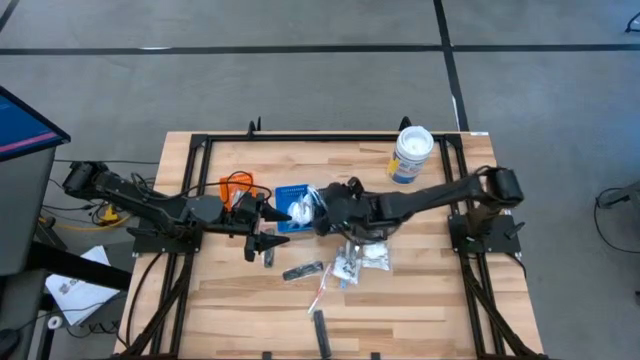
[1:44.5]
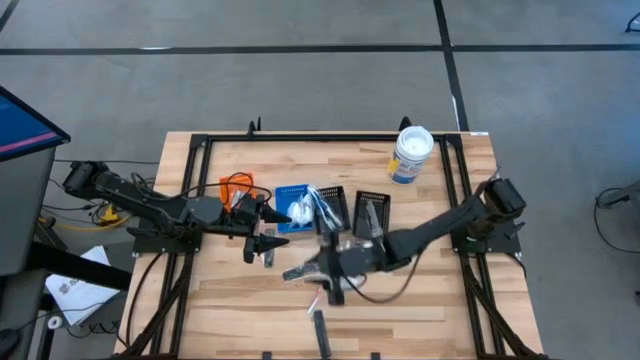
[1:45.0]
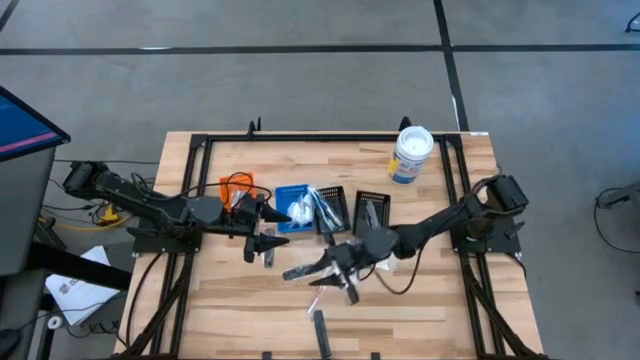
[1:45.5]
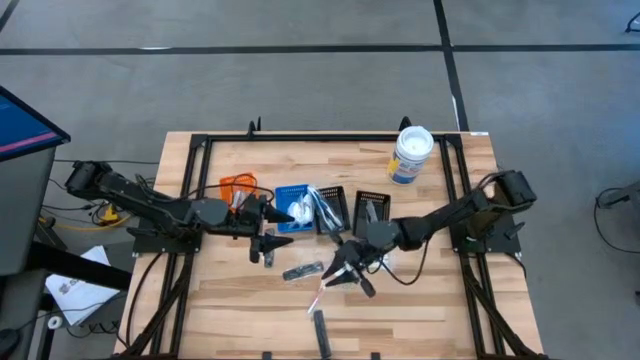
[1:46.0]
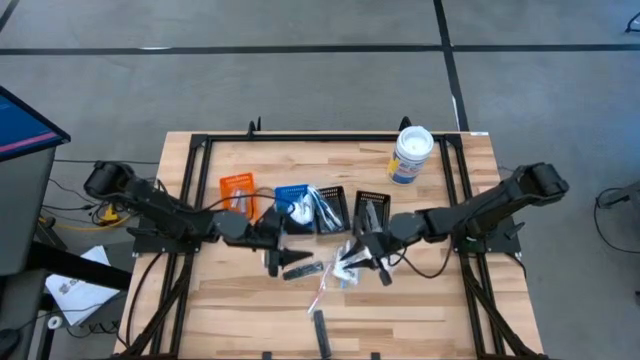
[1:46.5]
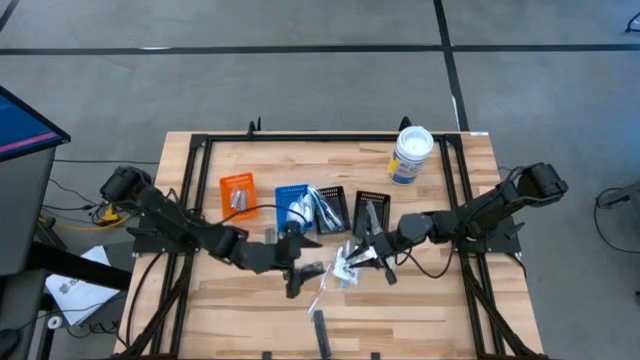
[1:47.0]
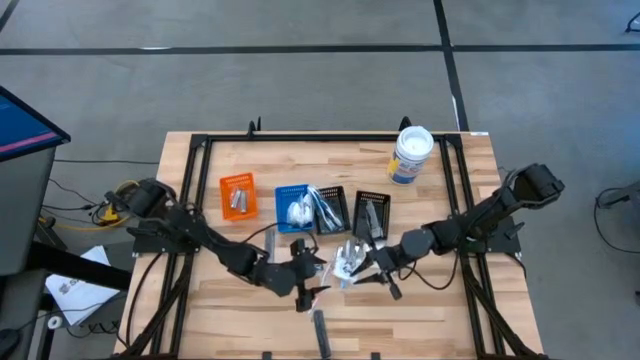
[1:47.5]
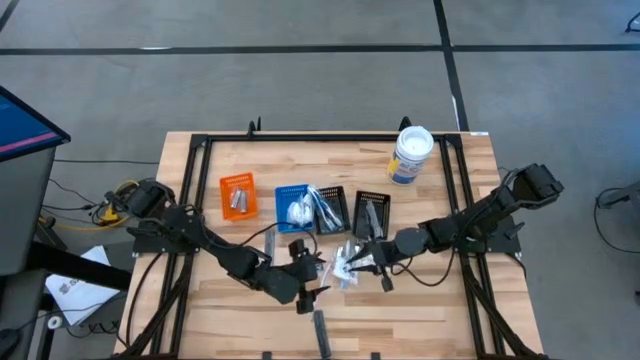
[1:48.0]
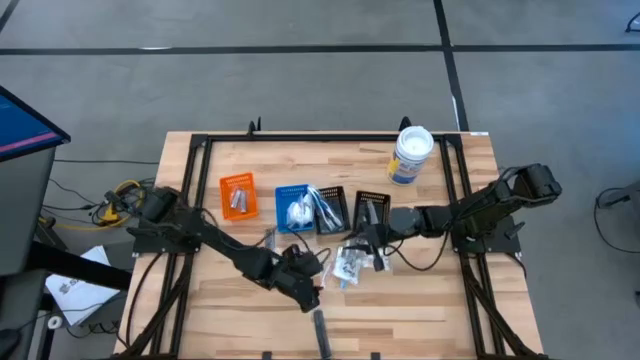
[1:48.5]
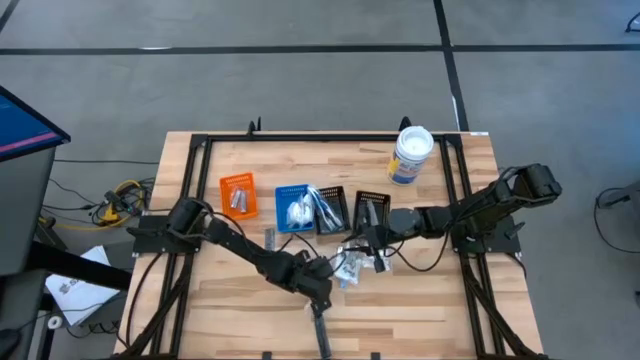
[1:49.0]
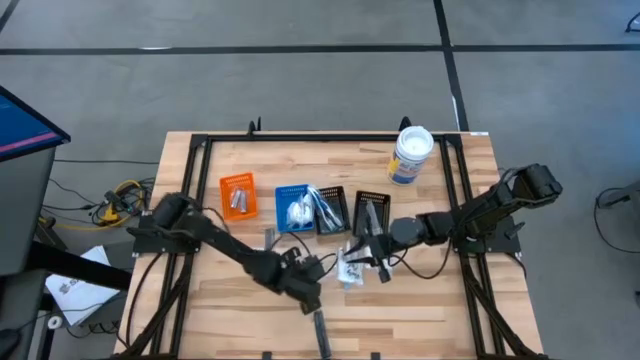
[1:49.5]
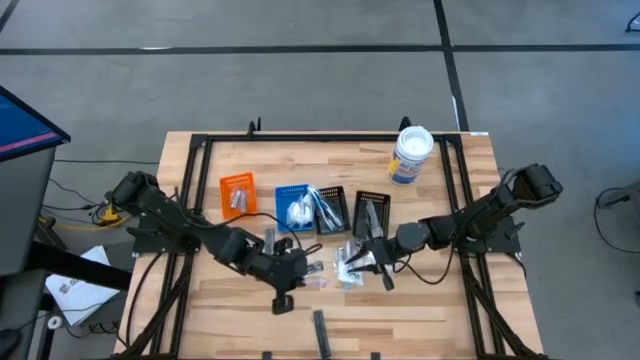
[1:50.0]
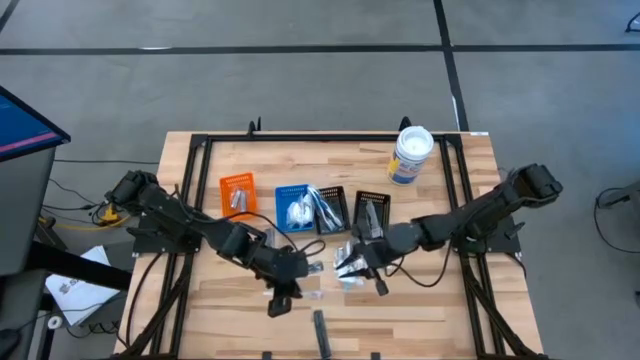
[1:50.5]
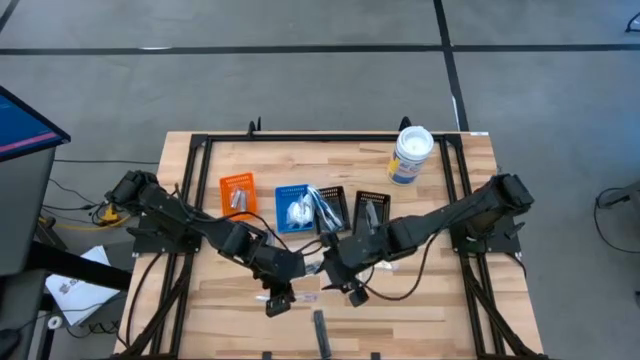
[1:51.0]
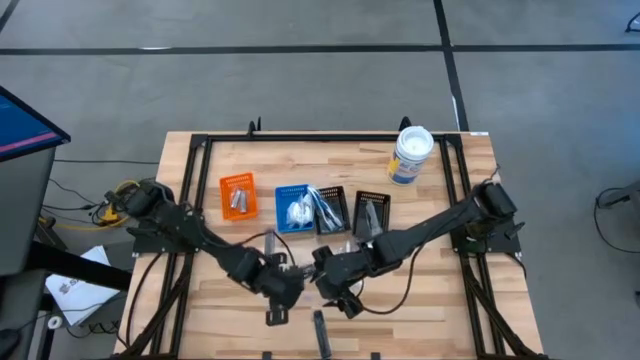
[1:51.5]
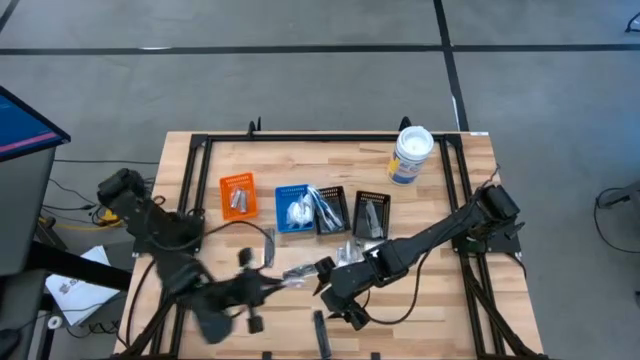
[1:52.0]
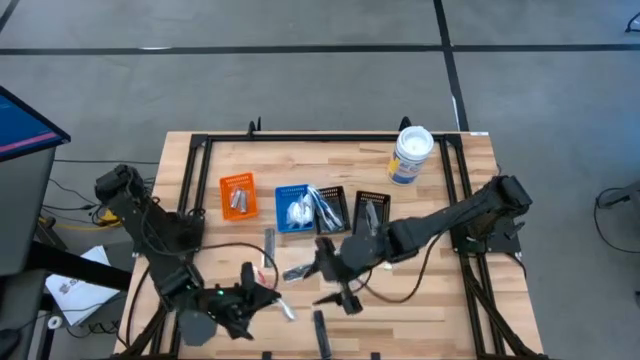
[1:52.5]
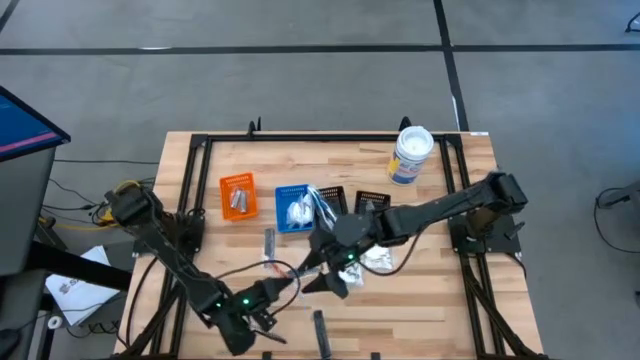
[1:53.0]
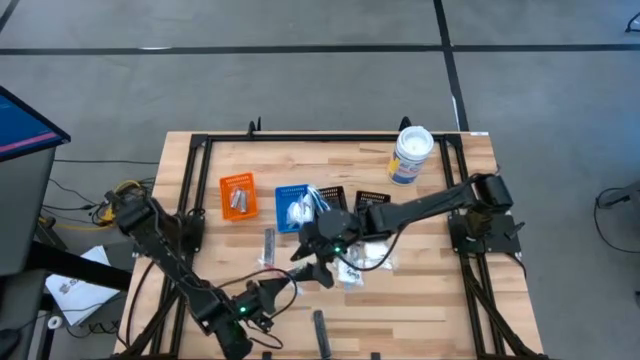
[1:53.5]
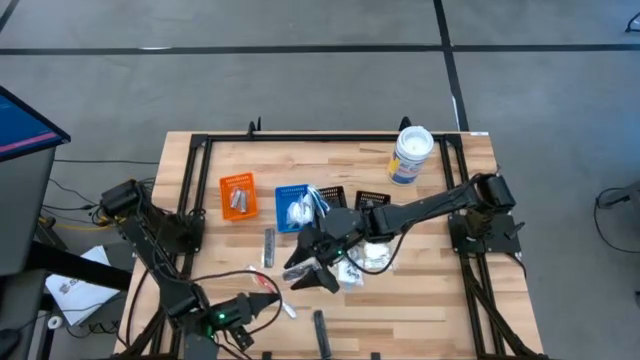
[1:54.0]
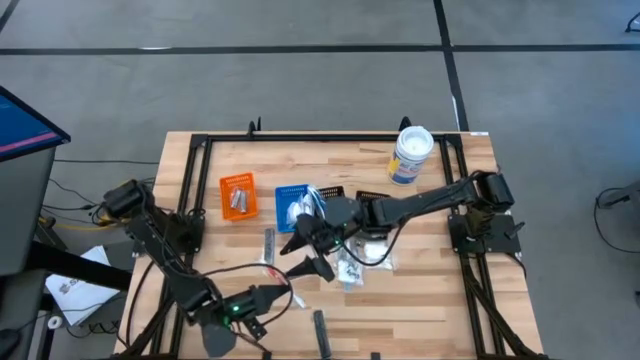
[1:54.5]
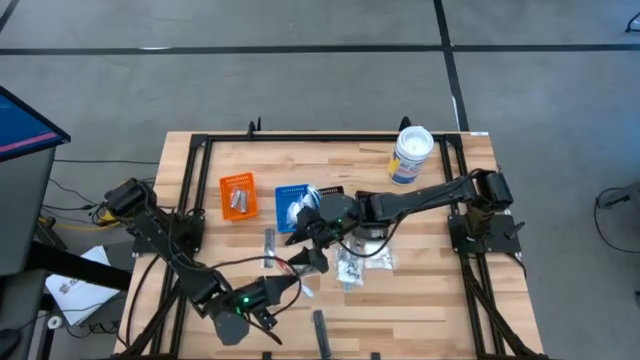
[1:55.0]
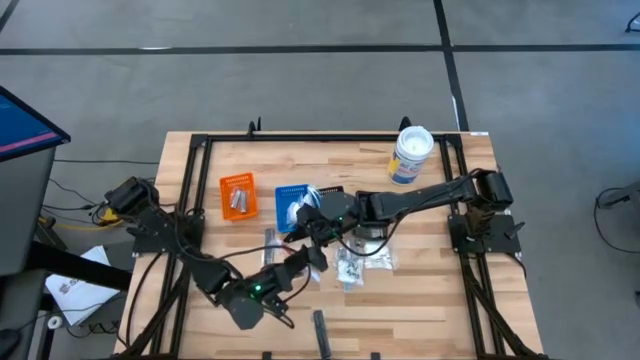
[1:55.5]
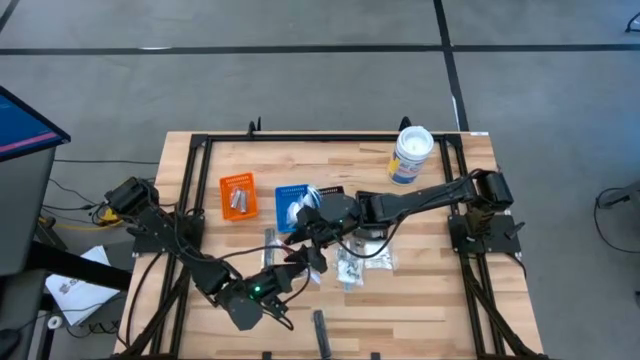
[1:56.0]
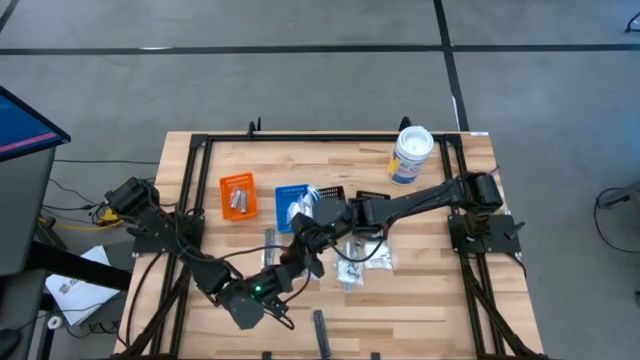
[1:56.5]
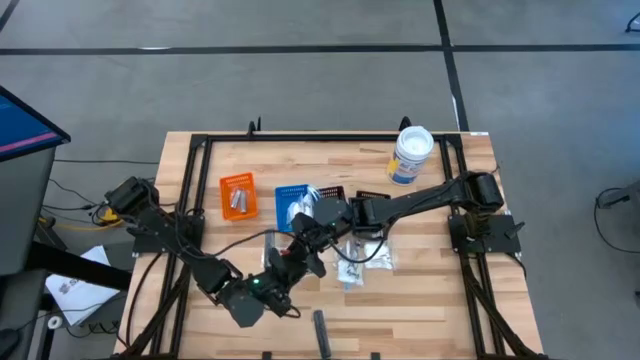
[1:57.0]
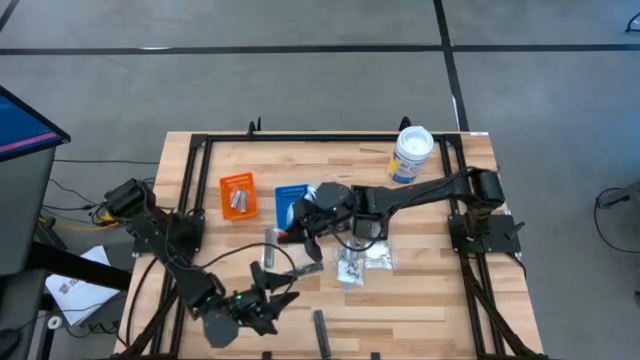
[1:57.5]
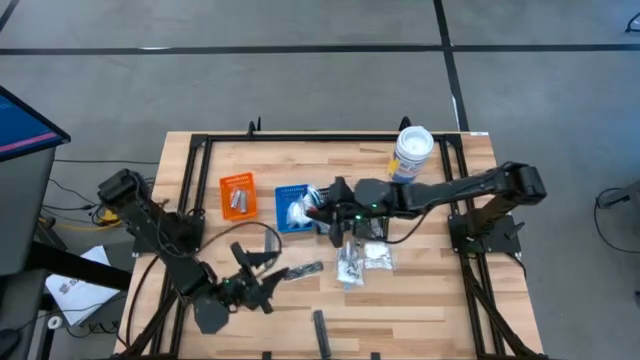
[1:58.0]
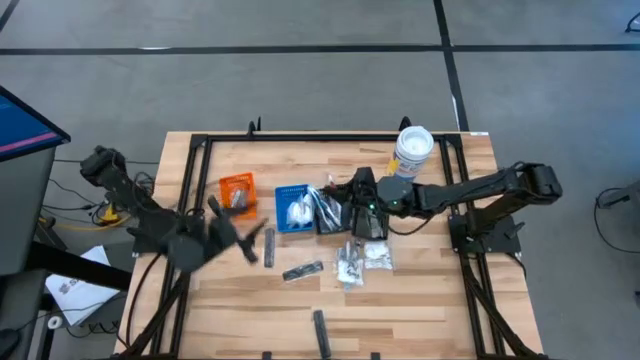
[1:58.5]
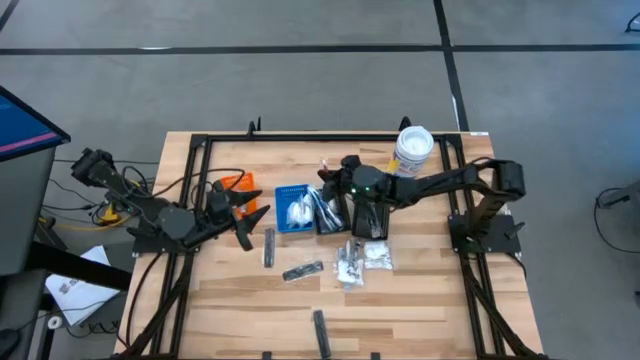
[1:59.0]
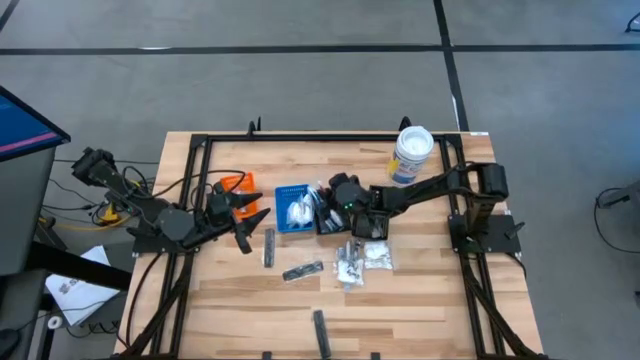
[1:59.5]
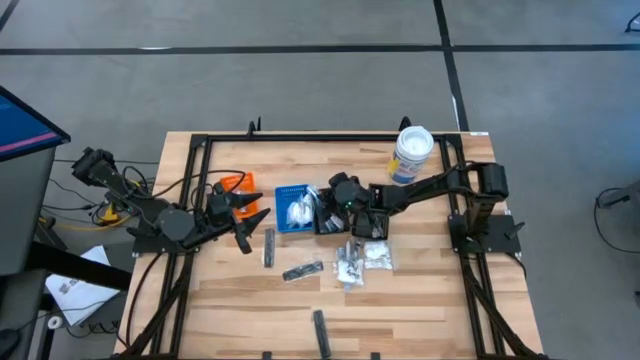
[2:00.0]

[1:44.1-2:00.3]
Task: Pick & Place Travel size toiletries
Put the orange toothbrush into the left black bin

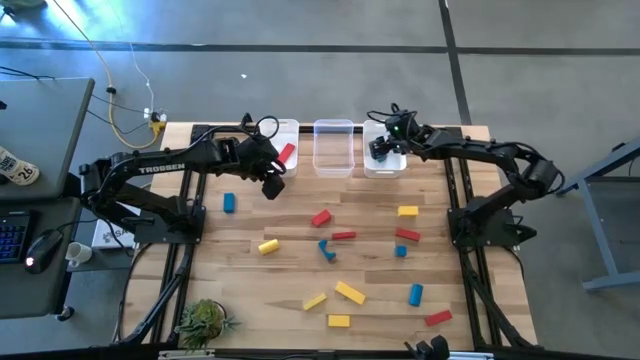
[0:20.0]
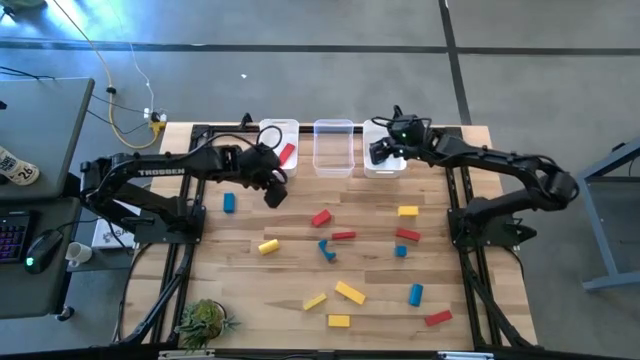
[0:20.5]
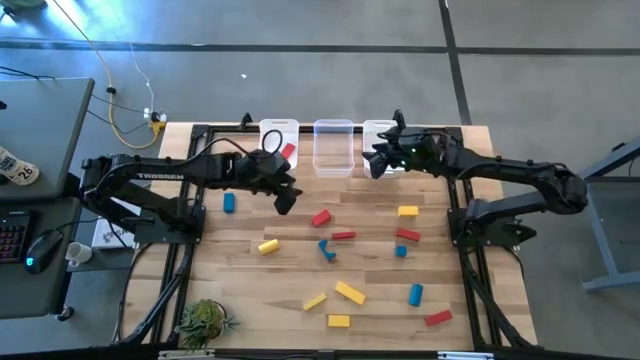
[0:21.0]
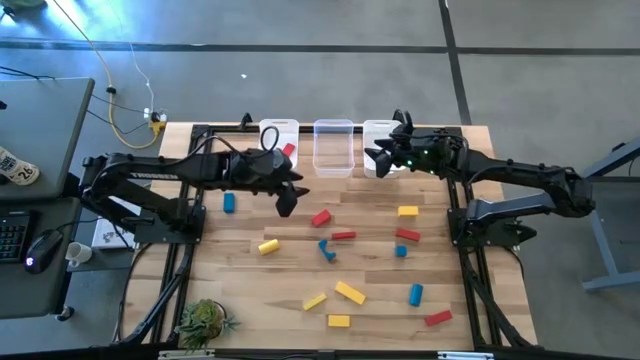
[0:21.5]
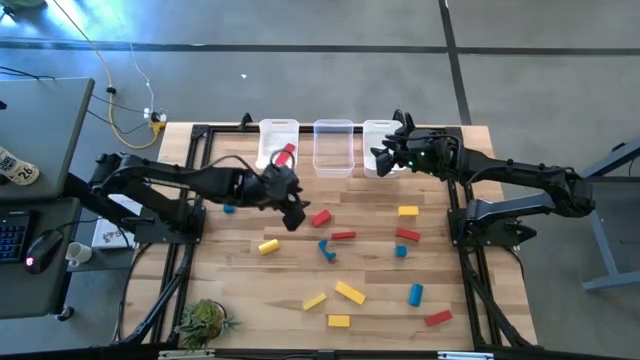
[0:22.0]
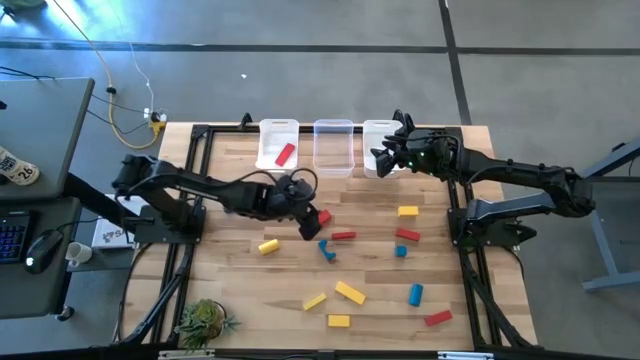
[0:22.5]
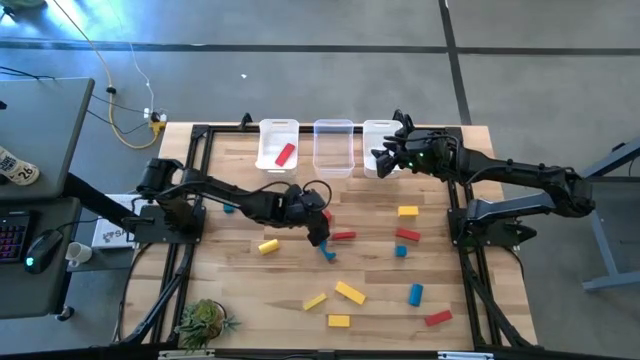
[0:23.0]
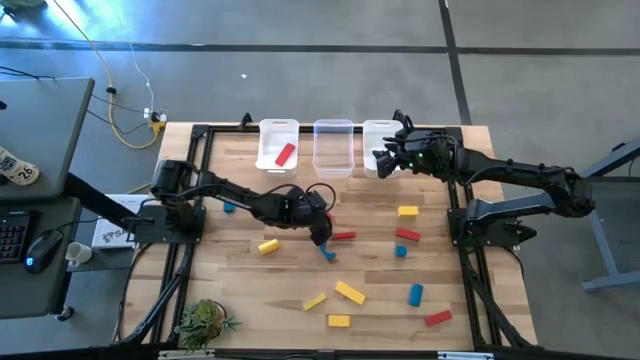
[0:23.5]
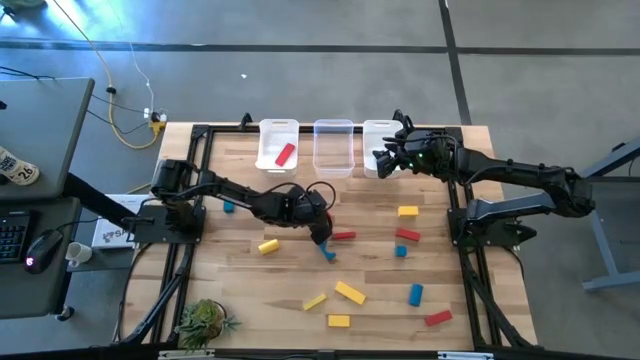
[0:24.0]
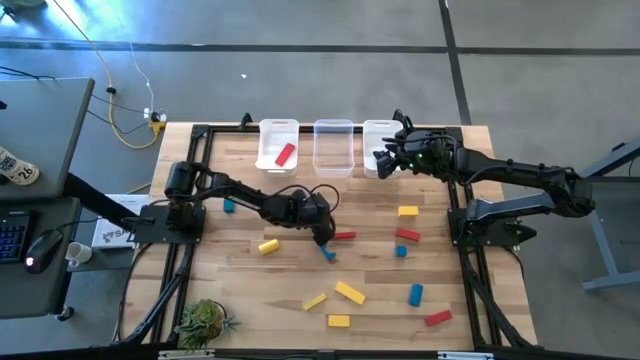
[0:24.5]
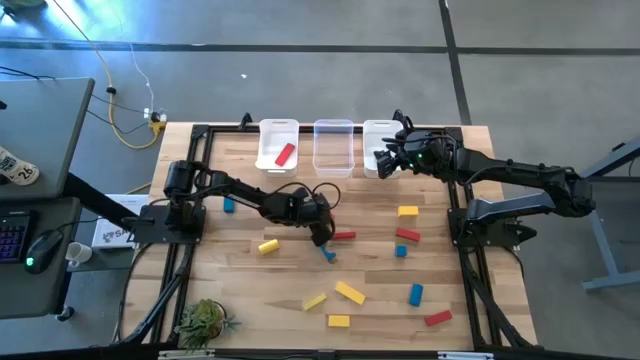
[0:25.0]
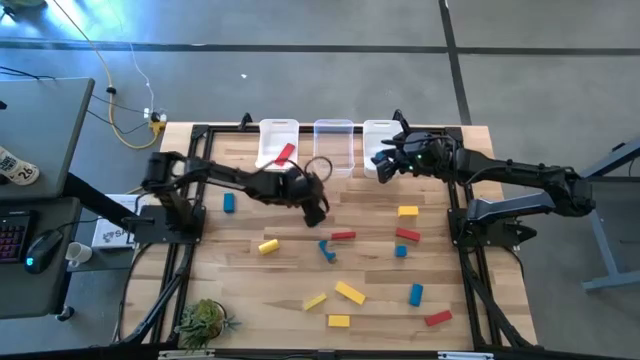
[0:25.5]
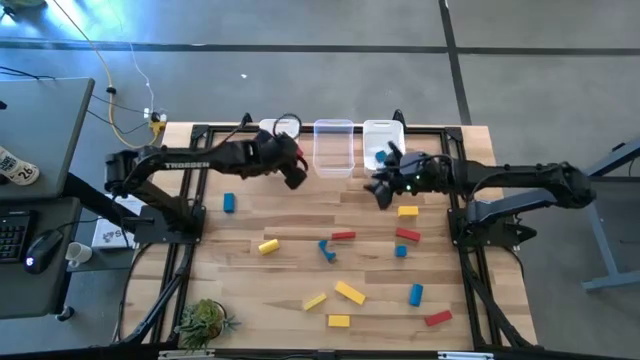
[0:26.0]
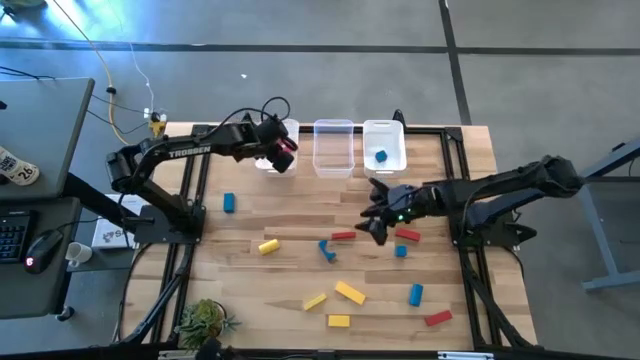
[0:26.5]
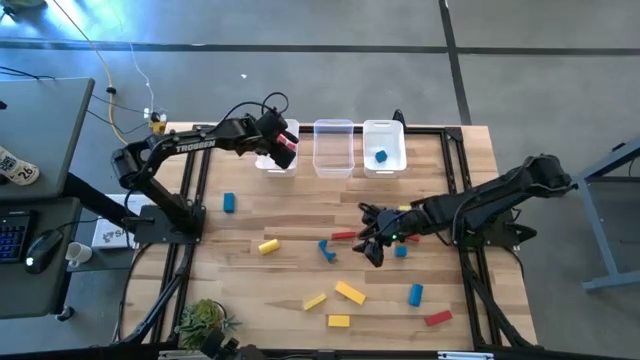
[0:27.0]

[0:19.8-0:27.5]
Task: Sort & place blocks by color
Put the red block into the left white bin
